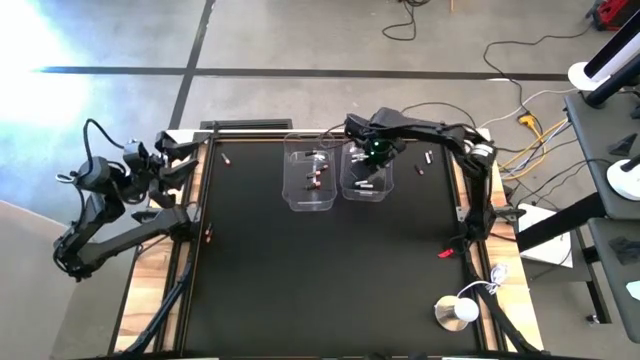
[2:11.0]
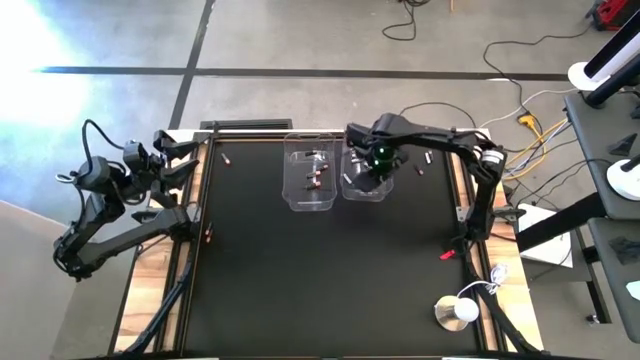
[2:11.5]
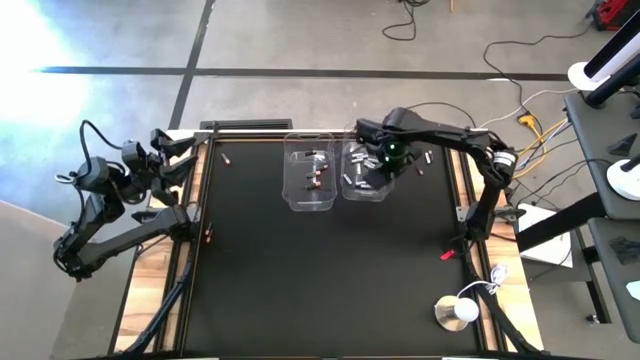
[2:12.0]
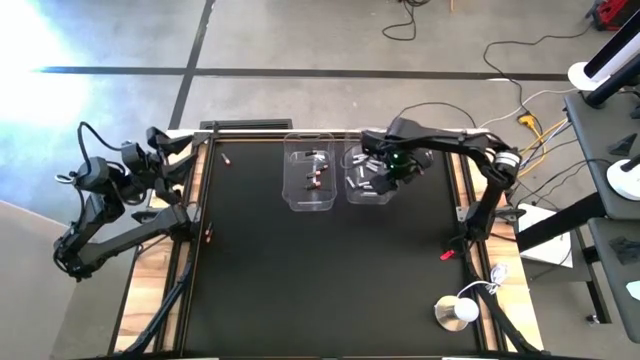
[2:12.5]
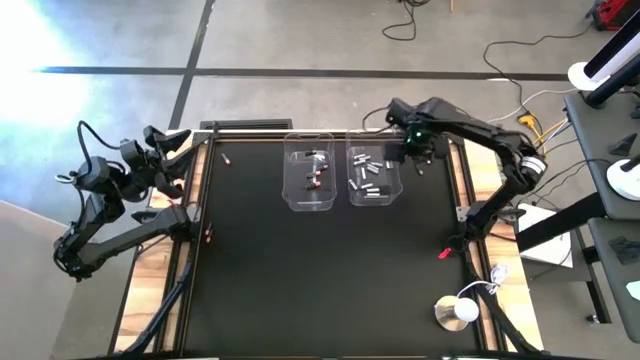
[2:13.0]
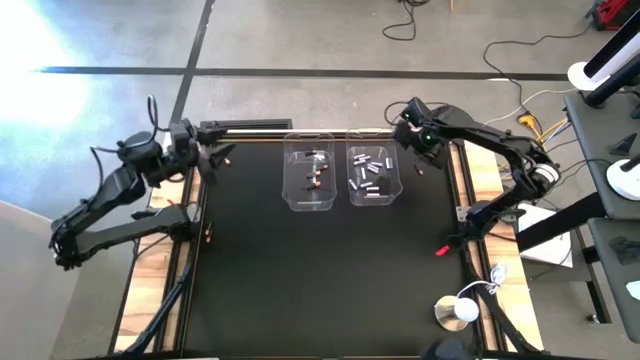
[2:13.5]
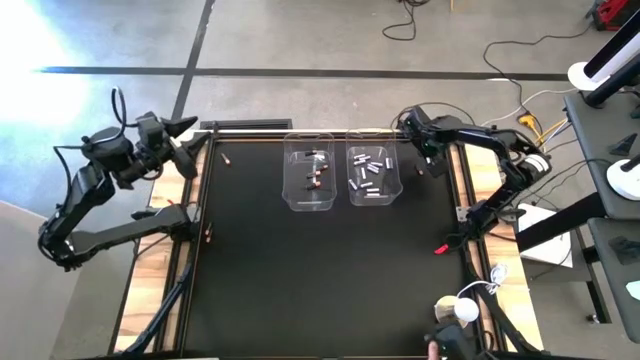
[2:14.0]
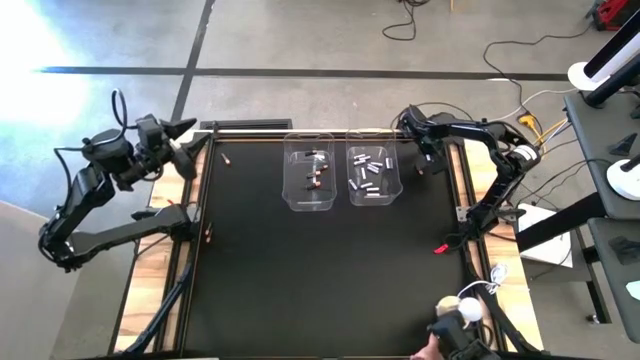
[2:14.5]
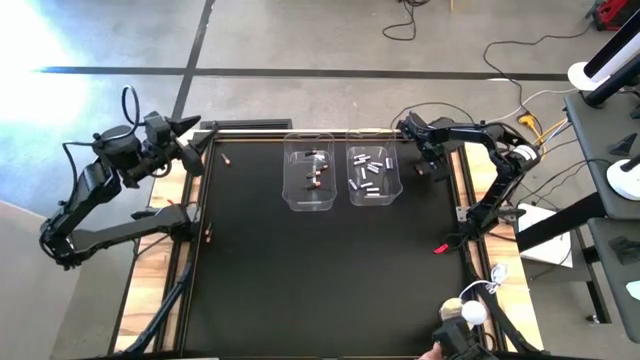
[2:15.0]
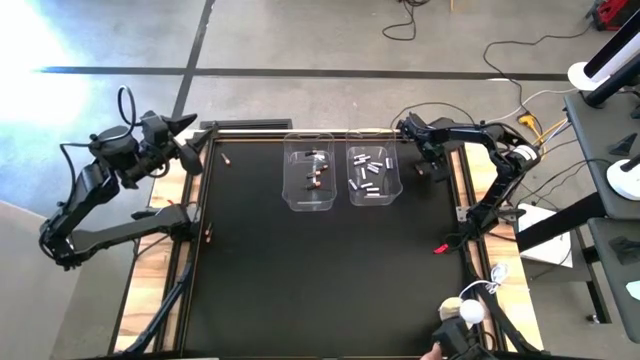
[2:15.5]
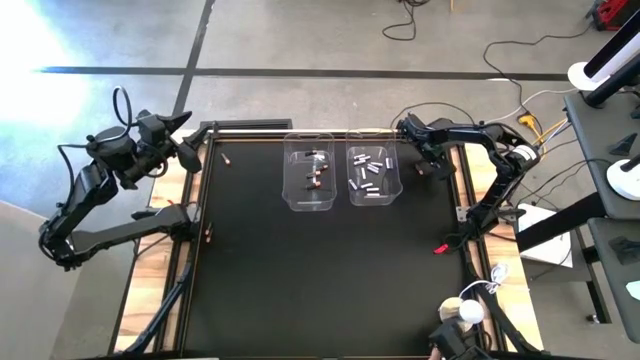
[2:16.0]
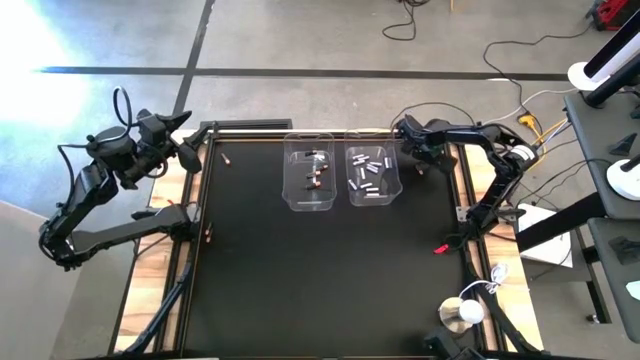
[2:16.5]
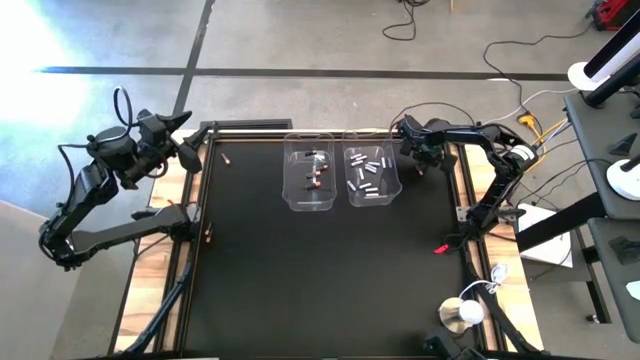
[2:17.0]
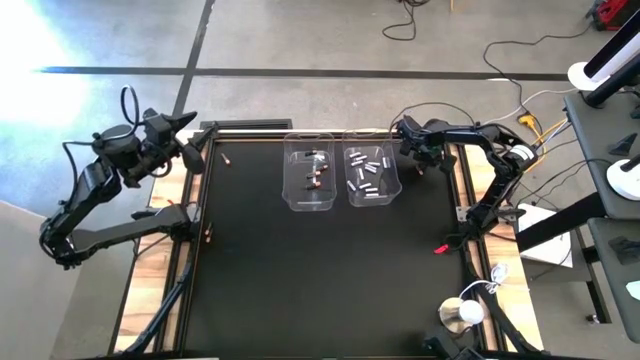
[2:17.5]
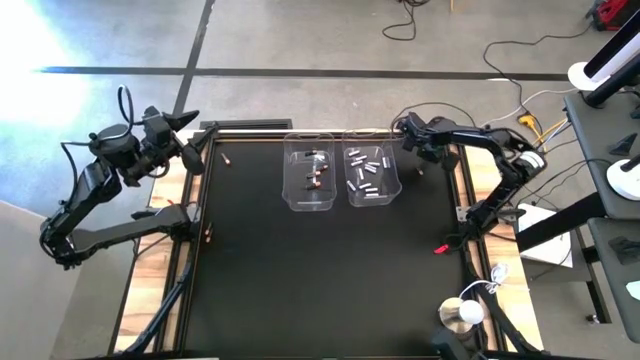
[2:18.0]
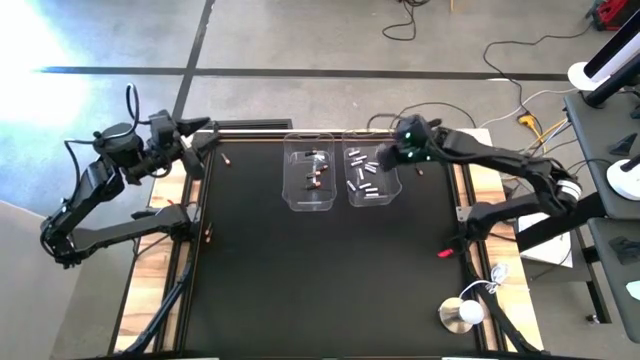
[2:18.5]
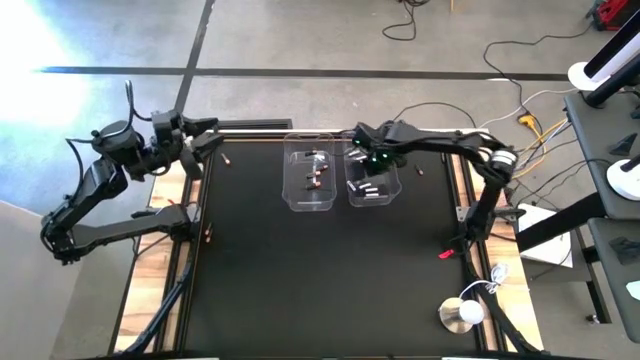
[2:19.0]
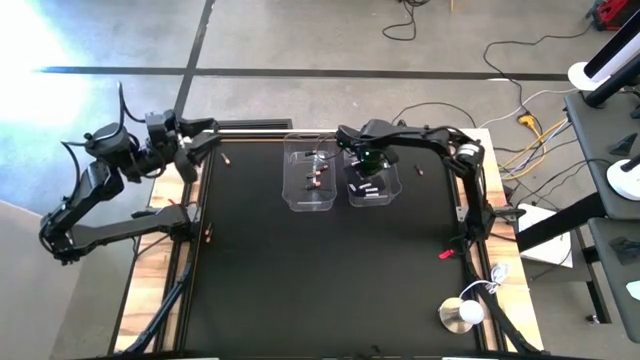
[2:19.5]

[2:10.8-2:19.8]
Task: Sort batteries
Put the white battery into the right transparent bin

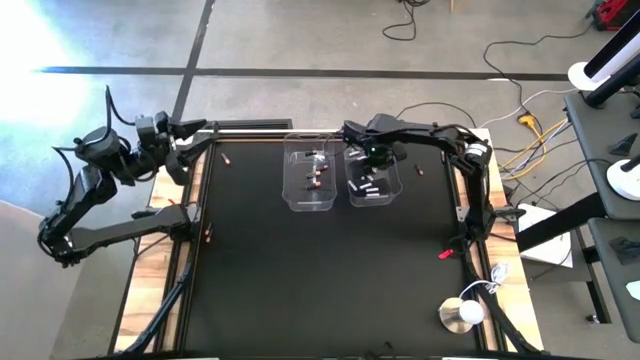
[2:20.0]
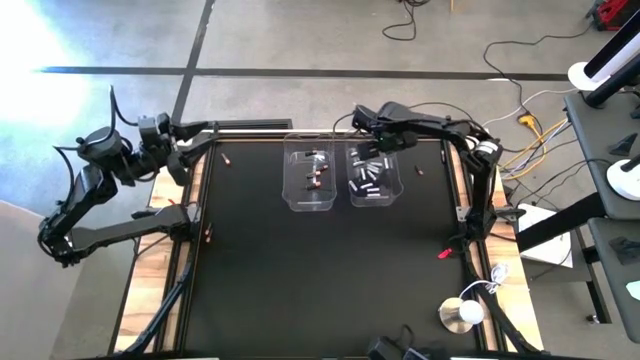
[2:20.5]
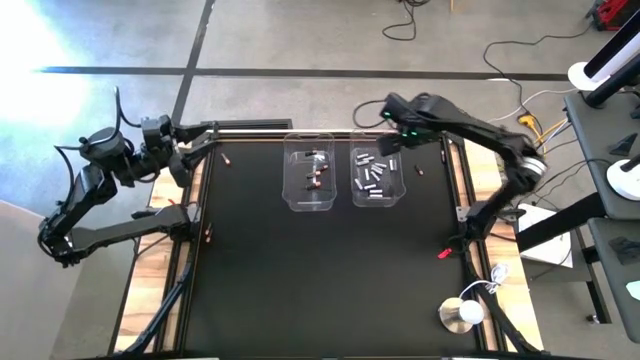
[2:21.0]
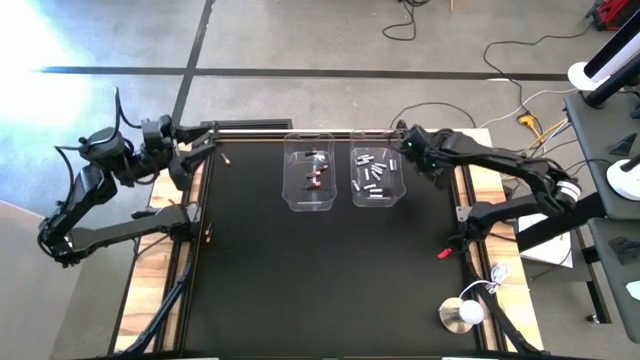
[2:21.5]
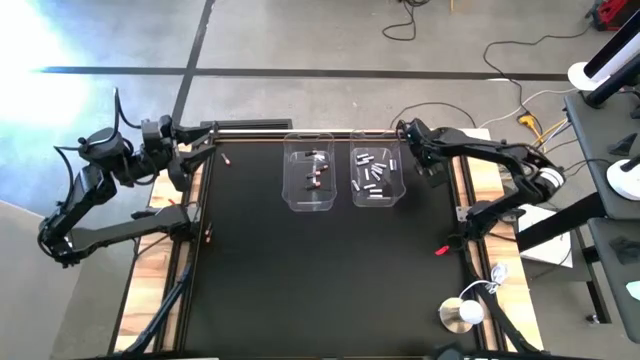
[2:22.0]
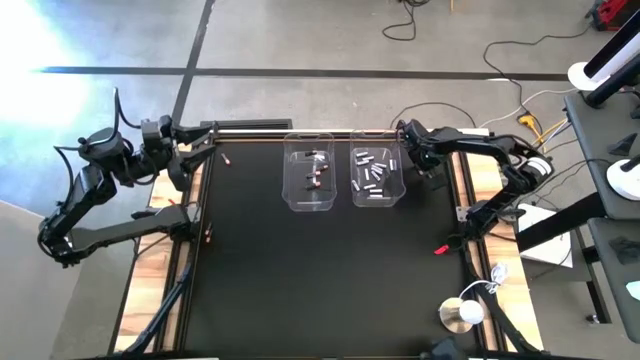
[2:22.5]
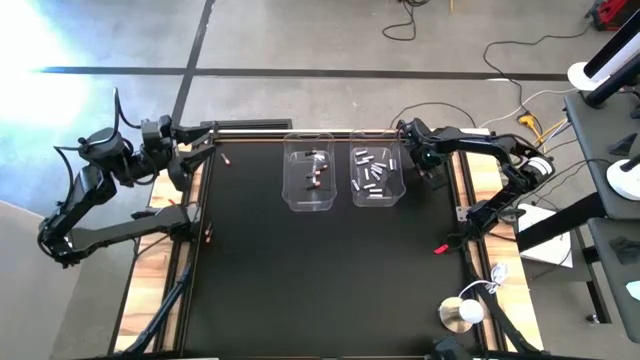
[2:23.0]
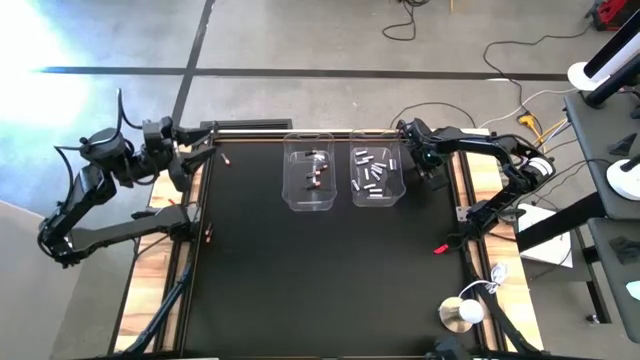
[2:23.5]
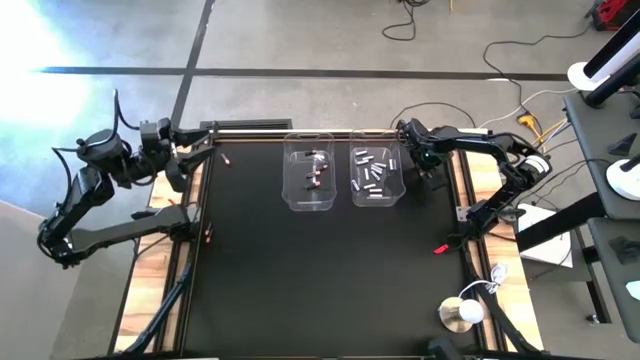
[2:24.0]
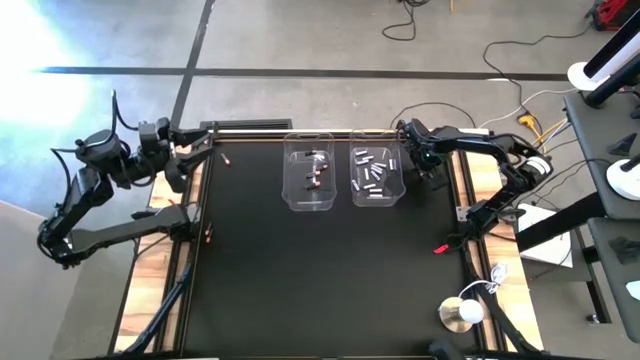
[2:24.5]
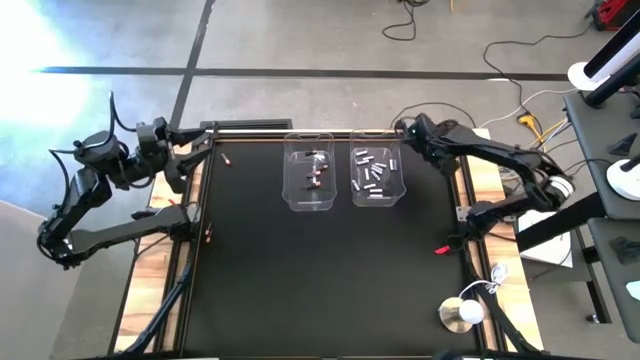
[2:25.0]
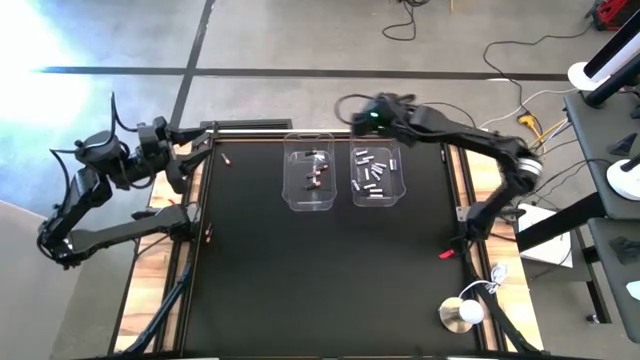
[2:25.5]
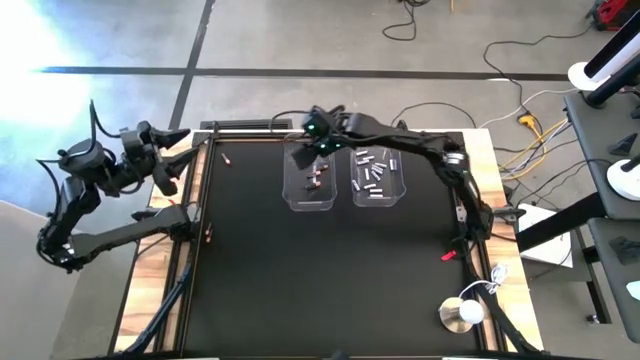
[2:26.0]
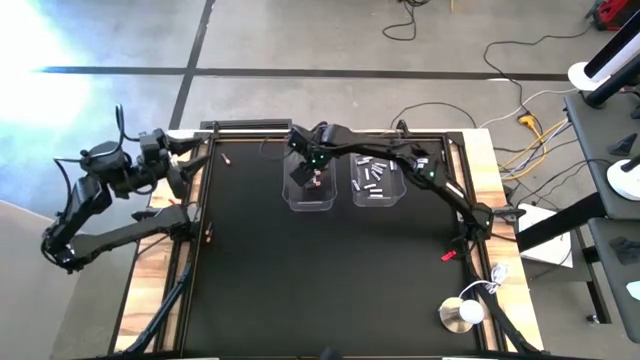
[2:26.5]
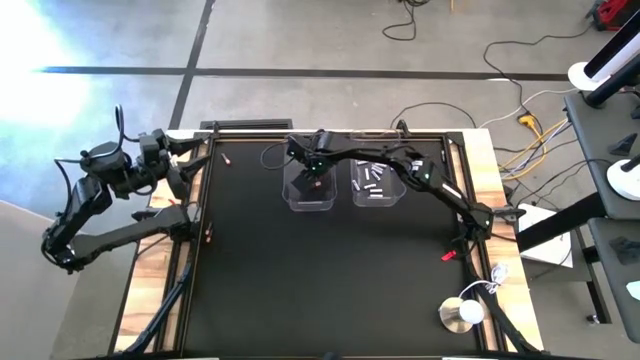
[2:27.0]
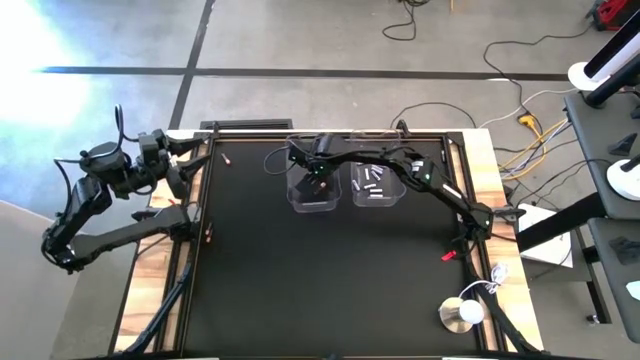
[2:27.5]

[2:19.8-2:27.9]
Put the black battery into the left transparent bin

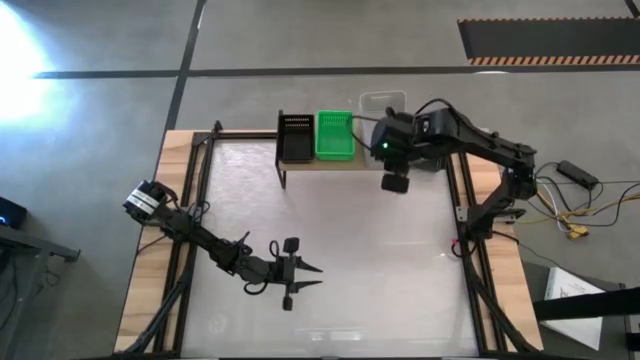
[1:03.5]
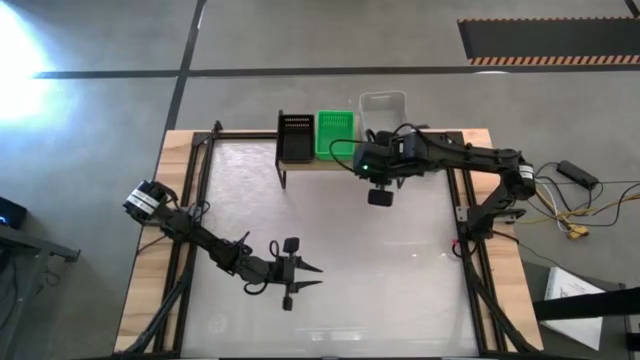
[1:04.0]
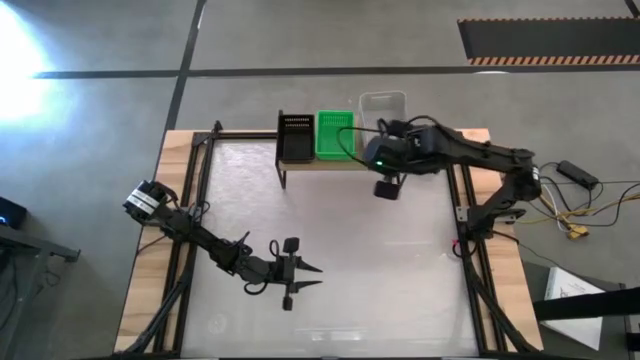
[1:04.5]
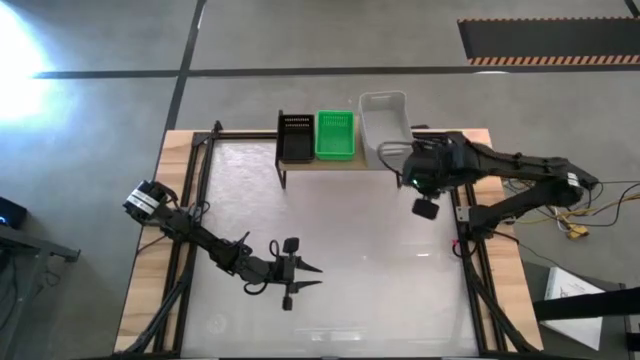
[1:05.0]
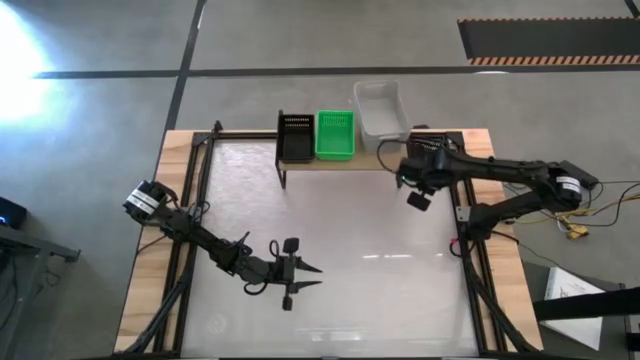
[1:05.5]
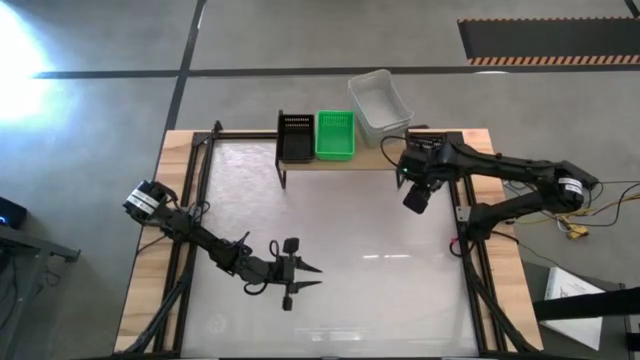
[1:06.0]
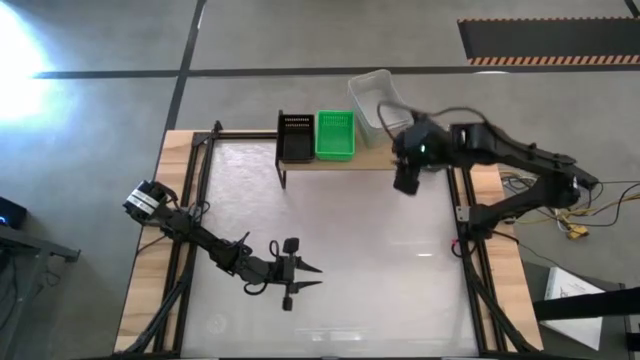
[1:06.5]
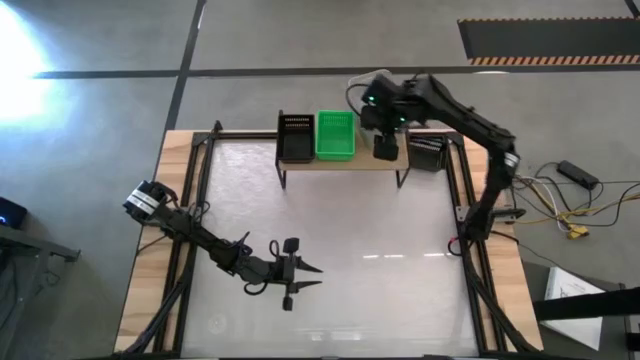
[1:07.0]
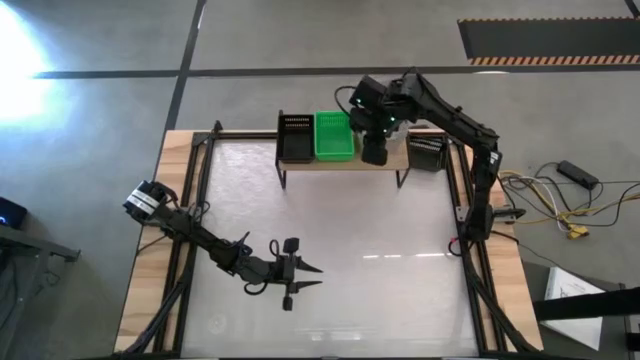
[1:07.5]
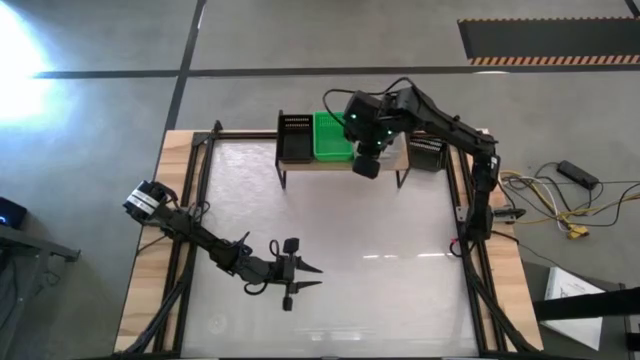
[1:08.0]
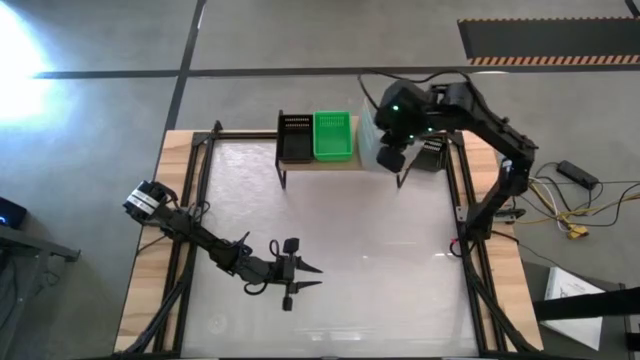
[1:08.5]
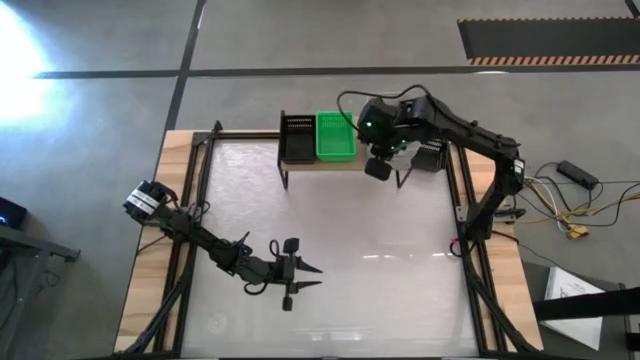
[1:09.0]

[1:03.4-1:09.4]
Task: Stack baskets on shelf by color
Adjust the white bins on the shelf
